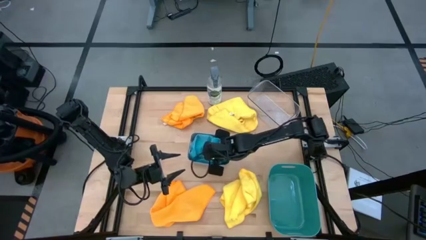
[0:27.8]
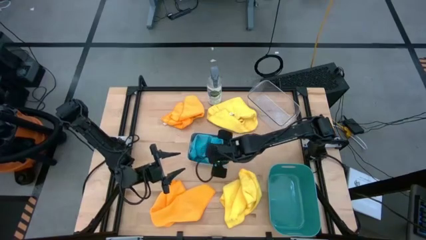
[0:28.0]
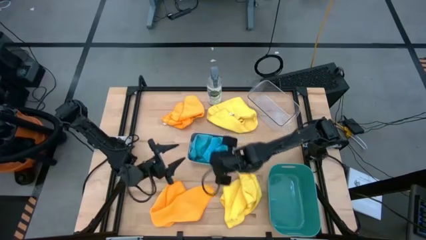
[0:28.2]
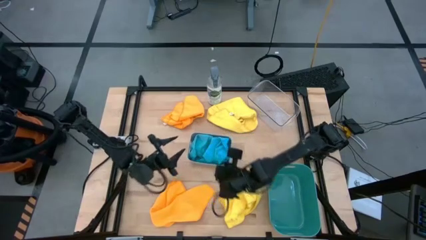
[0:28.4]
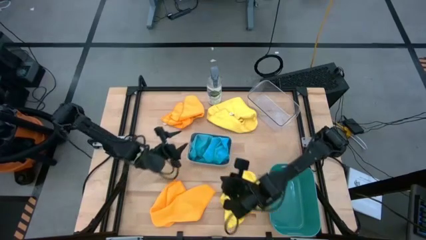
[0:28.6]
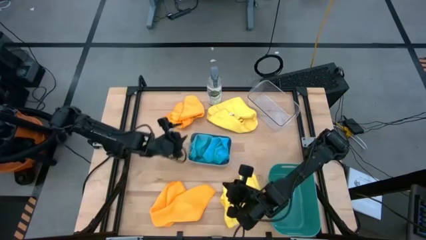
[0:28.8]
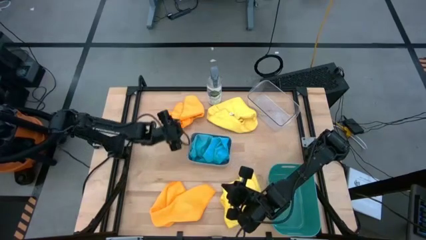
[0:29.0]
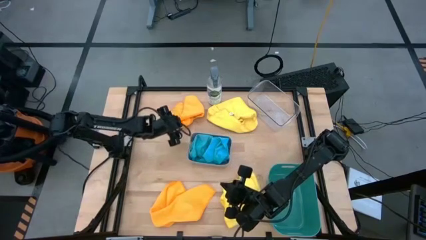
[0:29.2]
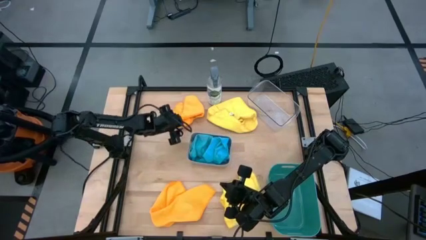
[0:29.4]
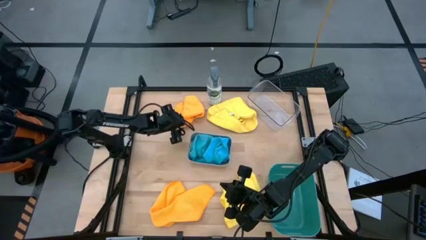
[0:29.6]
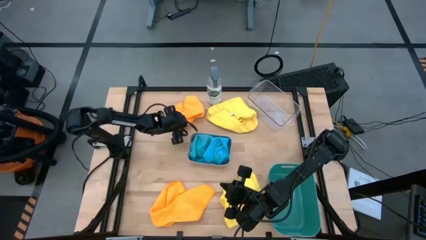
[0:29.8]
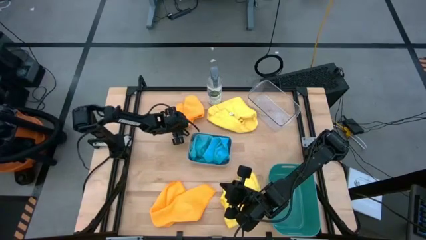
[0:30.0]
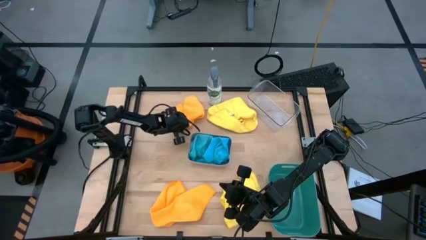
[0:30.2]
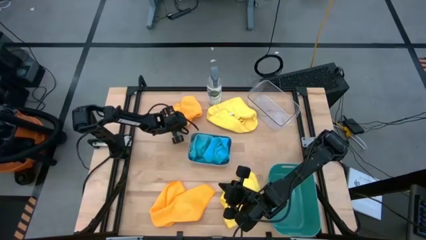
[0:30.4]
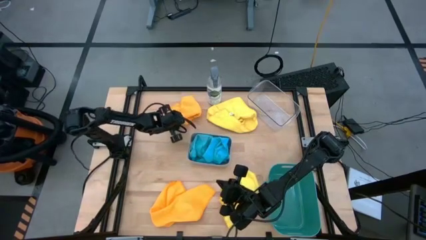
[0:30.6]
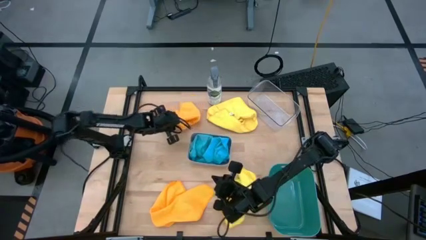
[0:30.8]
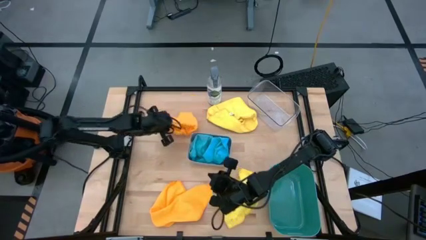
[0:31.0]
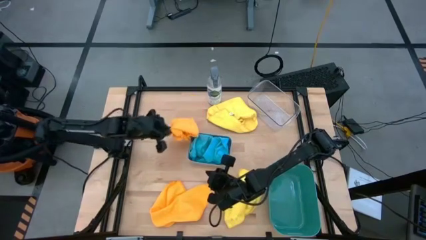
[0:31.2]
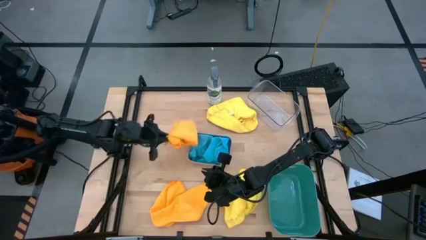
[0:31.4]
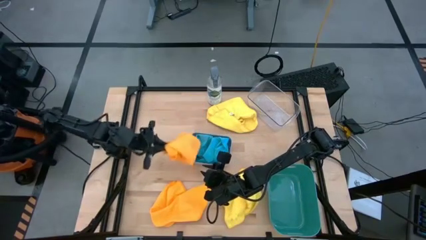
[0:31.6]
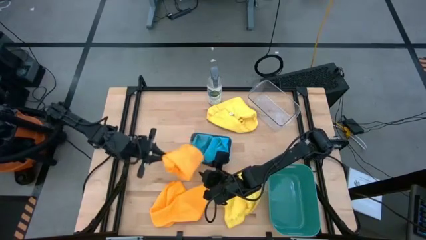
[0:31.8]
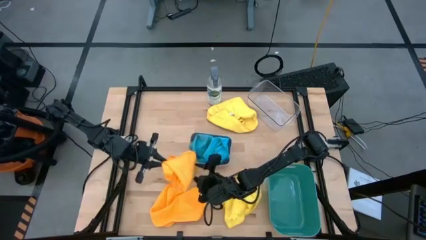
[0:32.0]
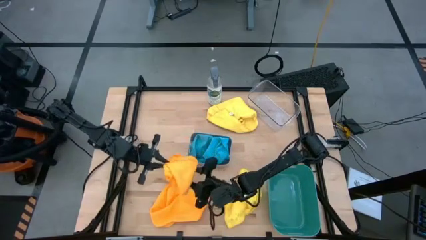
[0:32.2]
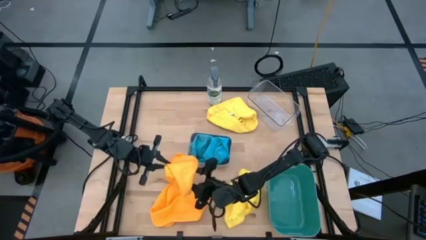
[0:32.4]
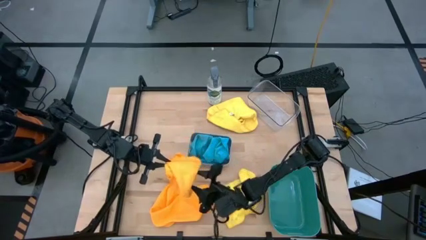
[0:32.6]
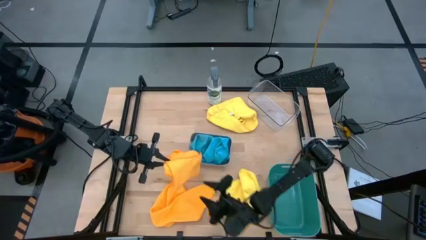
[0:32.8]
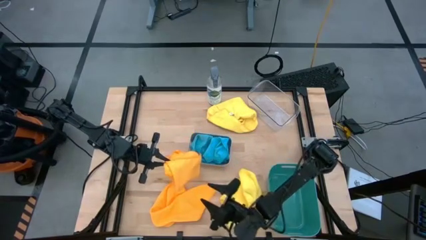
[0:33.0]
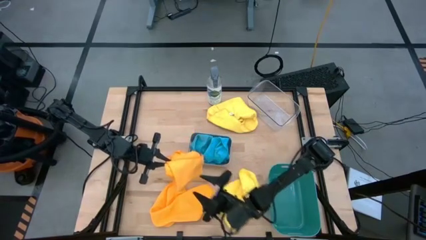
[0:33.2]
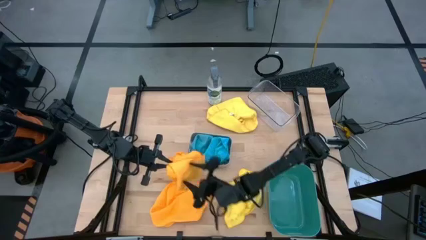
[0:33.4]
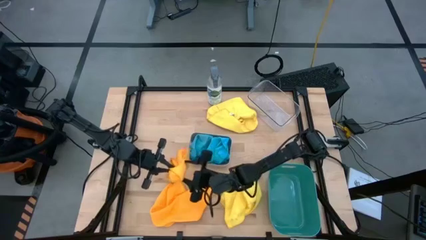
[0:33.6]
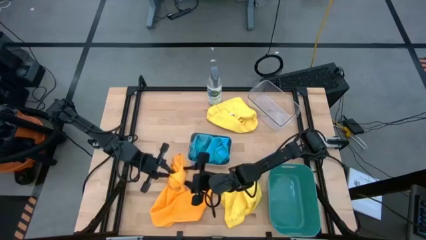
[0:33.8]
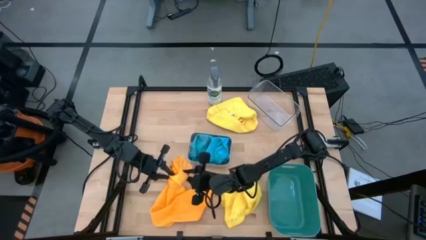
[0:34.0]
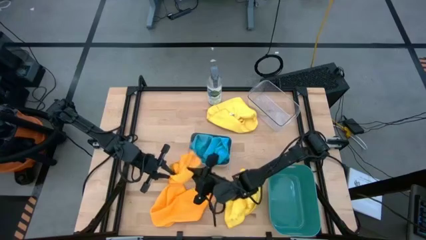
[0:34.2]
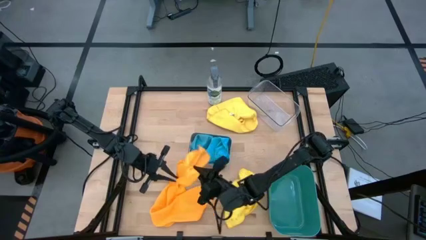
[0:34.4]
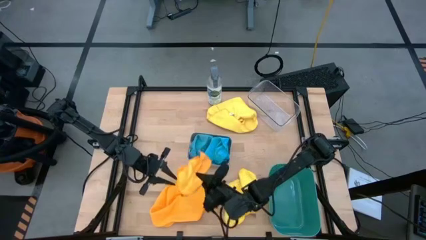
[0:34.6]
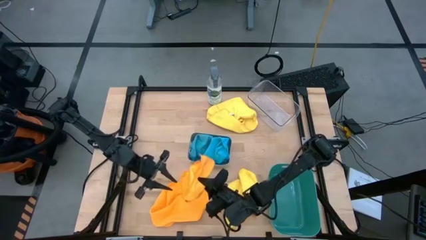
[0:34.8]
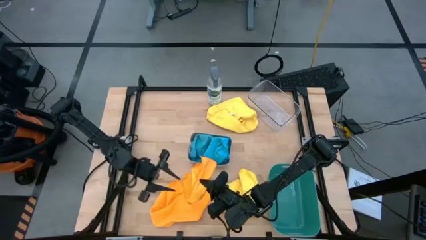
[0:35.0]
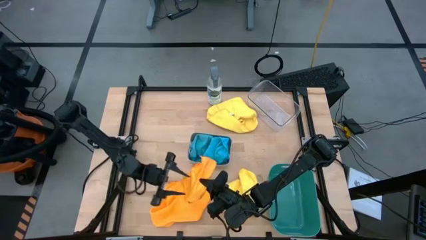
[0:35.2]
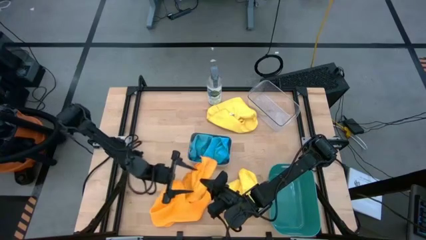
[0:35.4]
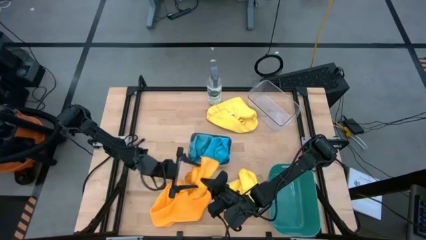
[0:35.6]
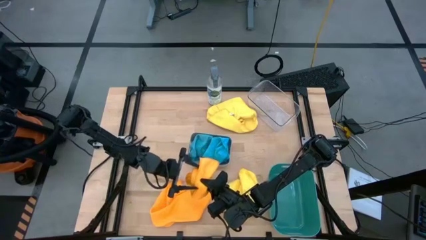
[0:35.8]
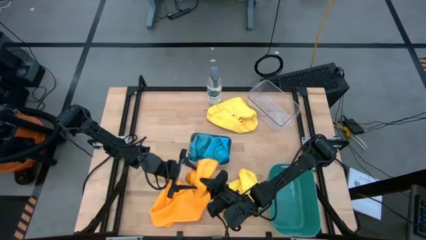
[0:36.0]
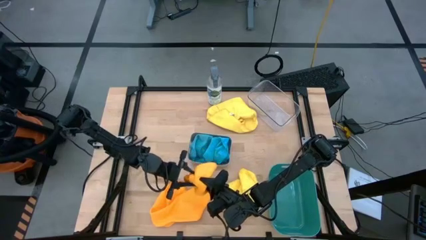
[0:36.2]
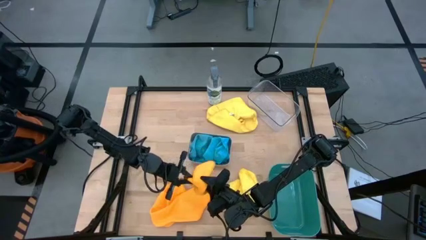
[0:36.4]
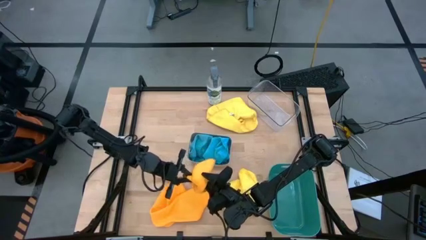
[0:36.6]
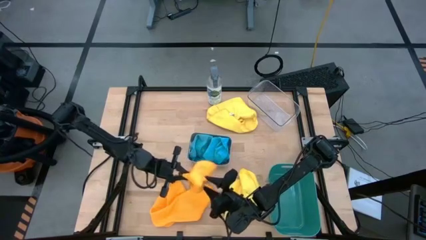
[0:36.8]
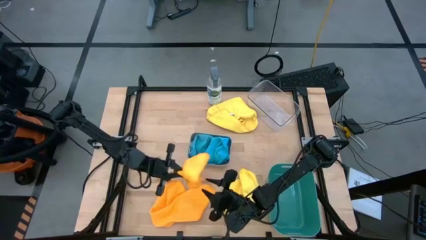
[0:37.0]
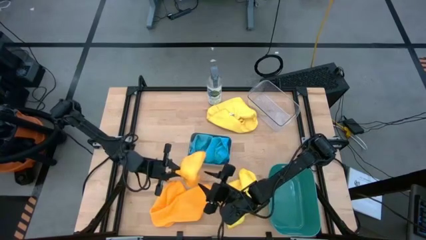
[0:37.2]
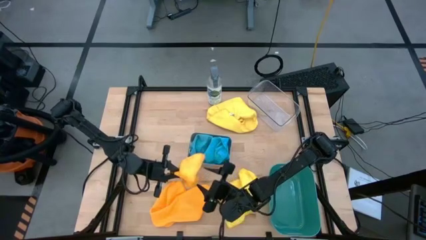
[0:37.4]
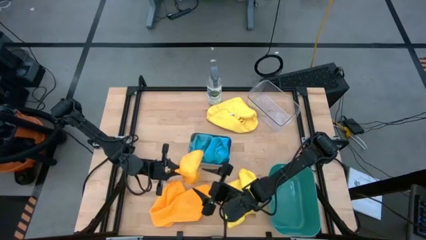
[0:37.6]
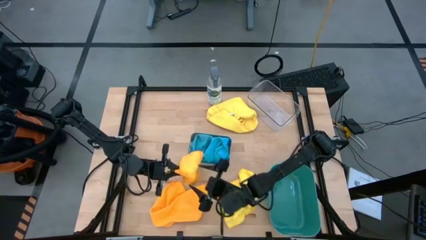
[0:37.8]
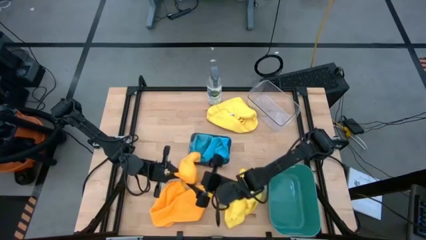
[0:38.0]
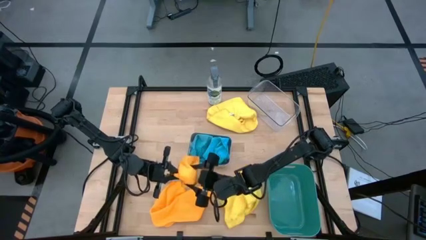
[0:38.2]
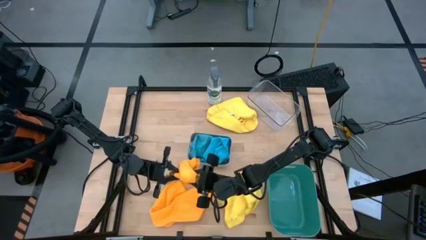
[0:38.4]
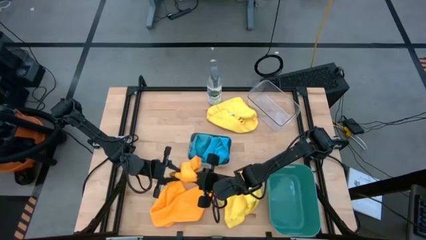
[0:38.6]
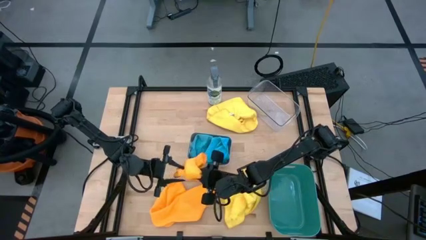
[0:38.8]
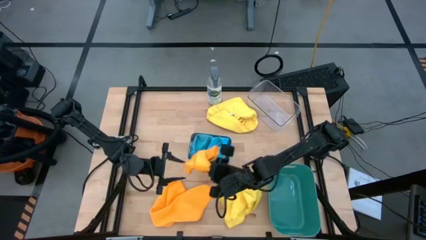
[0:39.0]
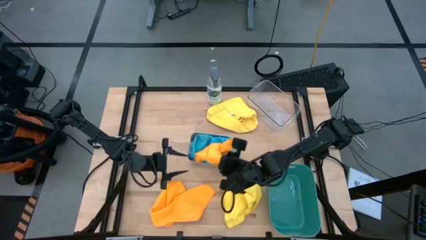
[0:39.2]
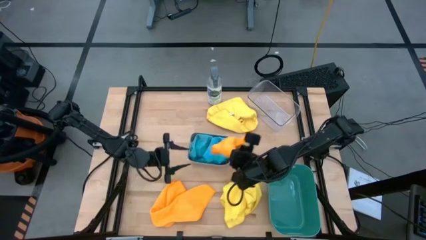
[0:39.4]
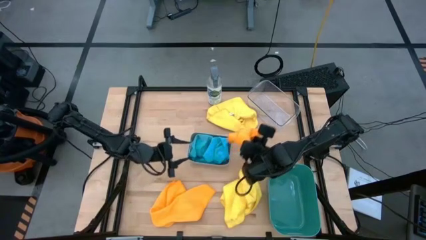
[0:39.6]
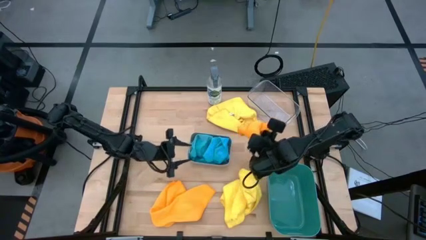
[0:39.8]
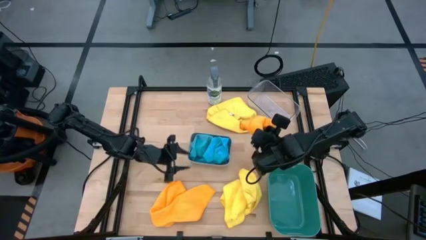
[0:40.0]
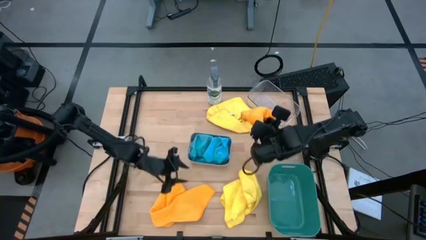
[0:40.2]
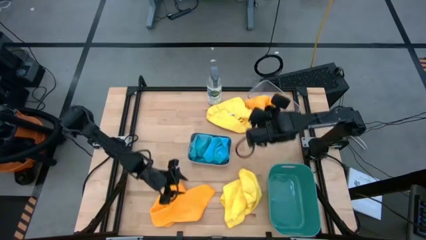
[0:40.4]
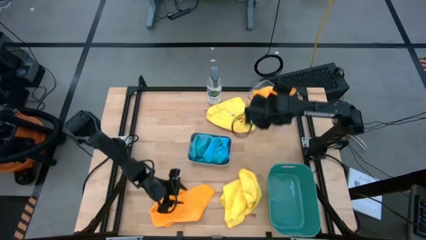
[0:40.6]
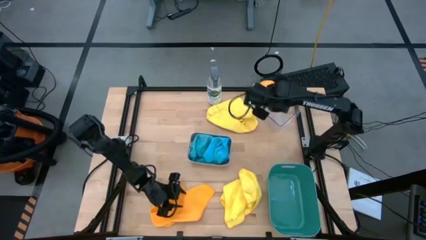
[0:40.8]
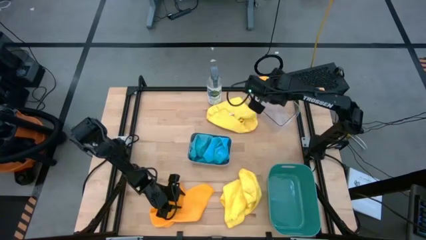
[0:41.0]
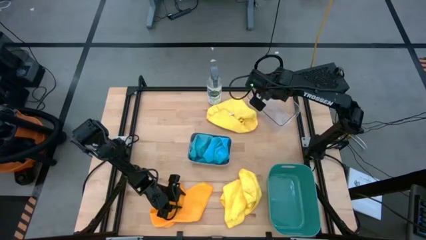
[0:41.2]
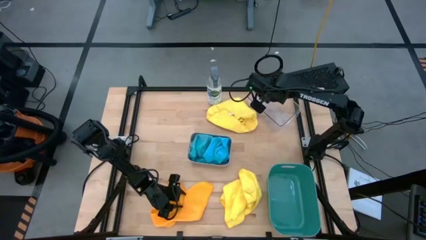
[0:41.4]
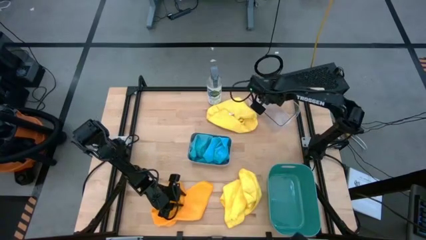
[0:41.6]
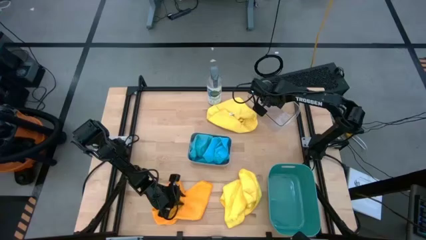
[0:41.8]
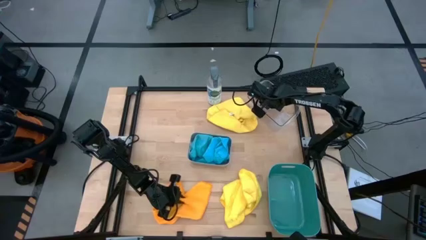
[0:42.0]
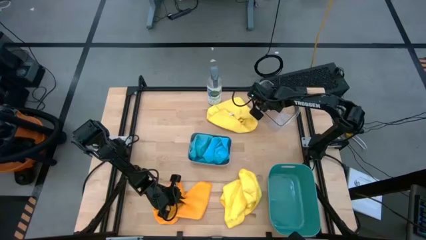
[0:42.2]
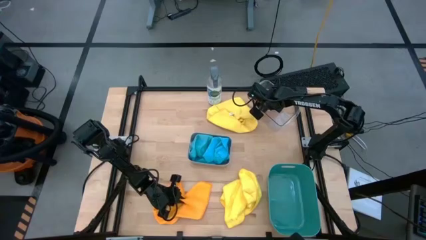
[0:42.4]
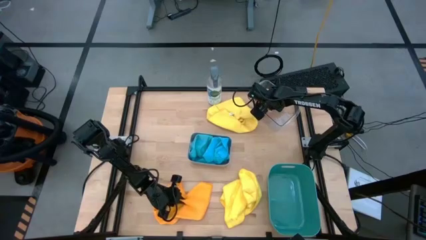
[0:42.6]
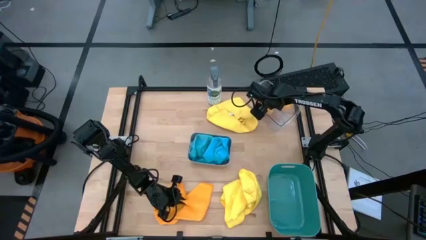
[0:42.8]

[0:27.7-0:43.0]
Task: Sort microfiber towel by color & place in baskets
Put the top orange towel in the transparent container
